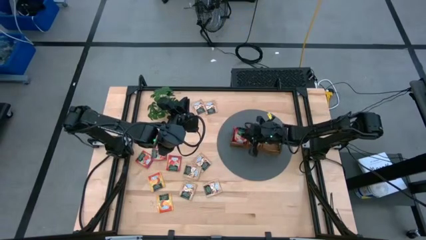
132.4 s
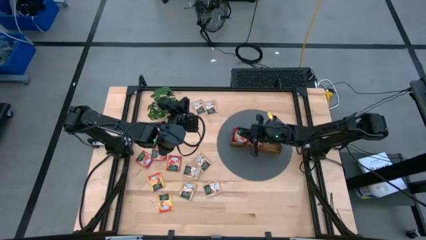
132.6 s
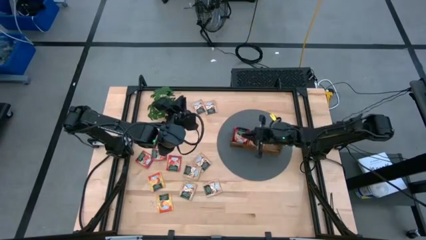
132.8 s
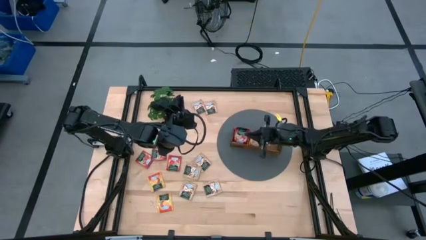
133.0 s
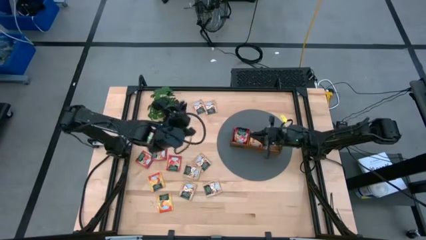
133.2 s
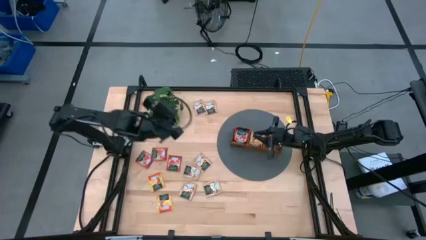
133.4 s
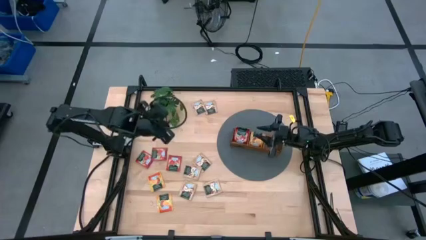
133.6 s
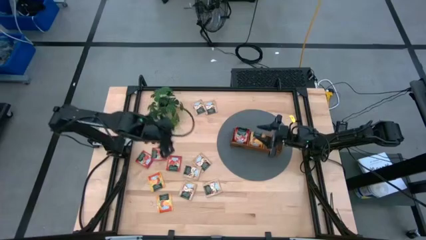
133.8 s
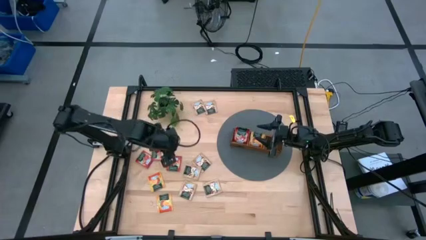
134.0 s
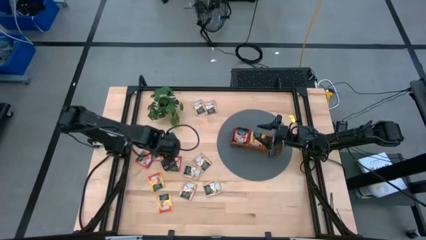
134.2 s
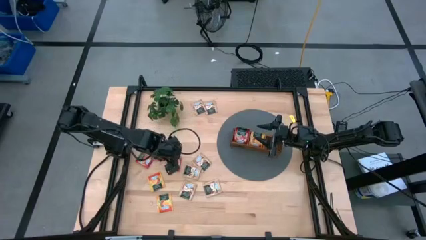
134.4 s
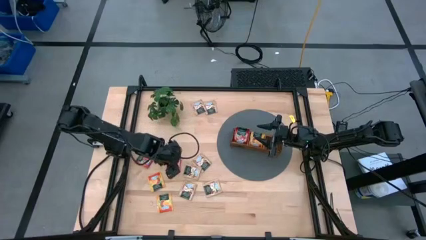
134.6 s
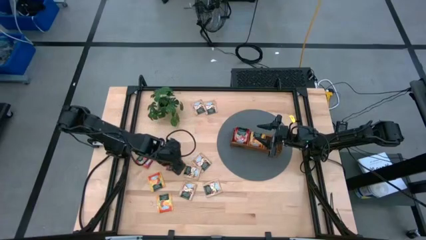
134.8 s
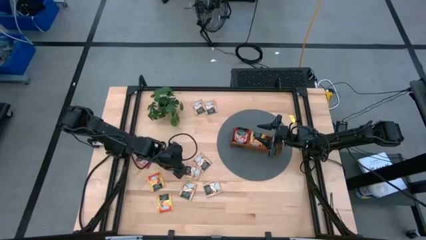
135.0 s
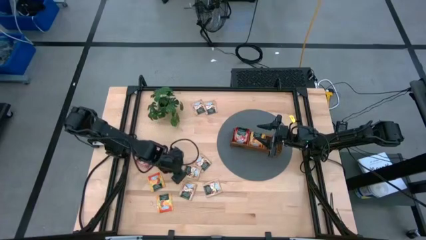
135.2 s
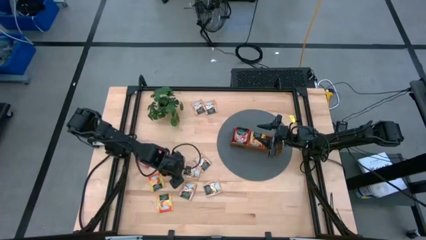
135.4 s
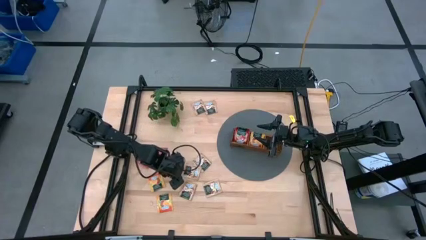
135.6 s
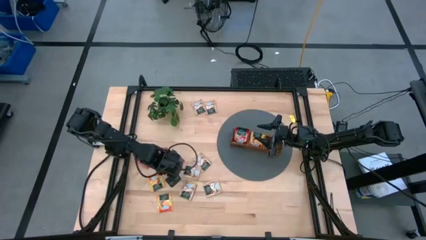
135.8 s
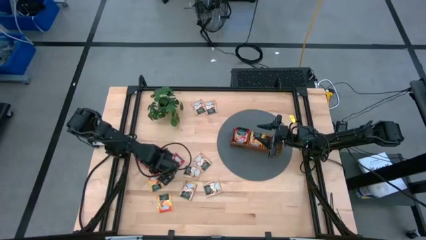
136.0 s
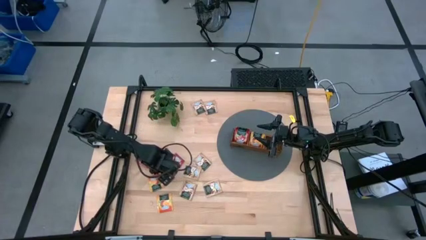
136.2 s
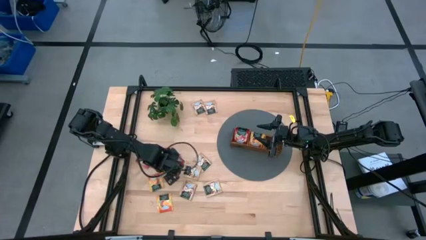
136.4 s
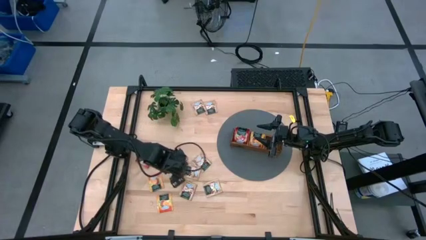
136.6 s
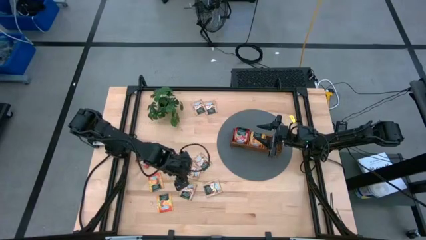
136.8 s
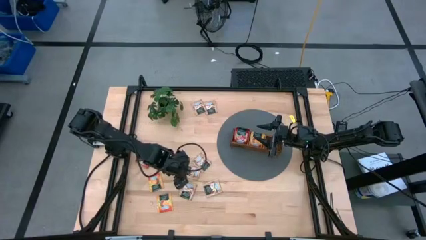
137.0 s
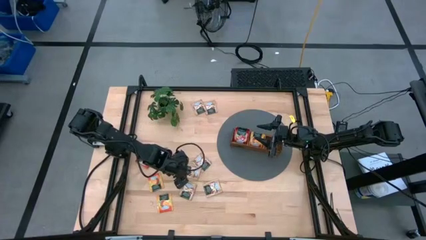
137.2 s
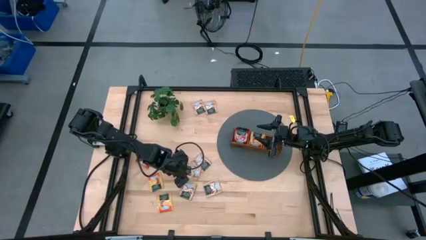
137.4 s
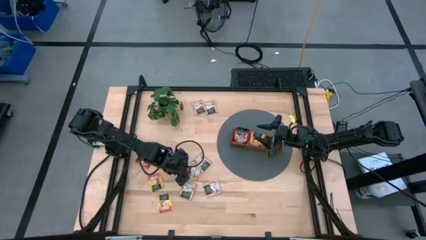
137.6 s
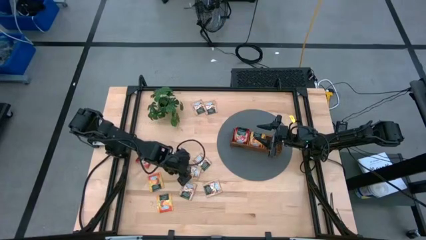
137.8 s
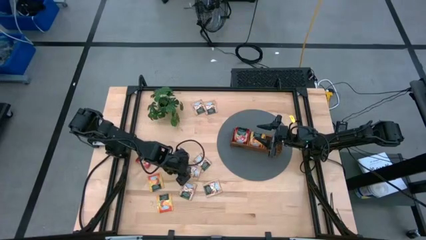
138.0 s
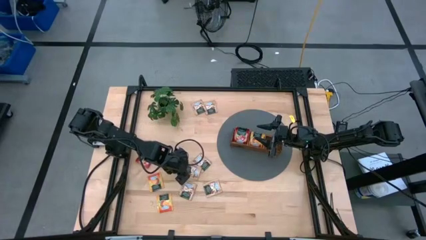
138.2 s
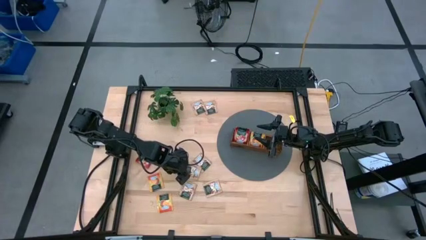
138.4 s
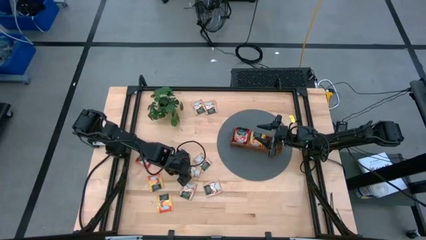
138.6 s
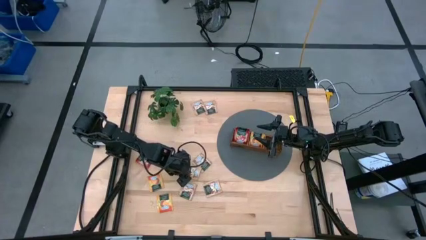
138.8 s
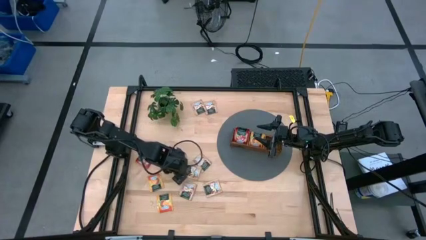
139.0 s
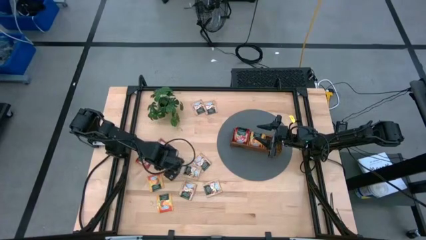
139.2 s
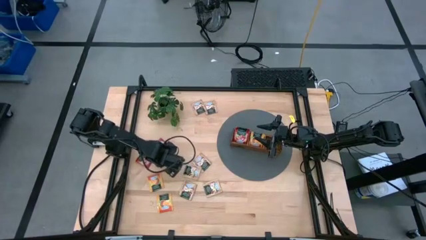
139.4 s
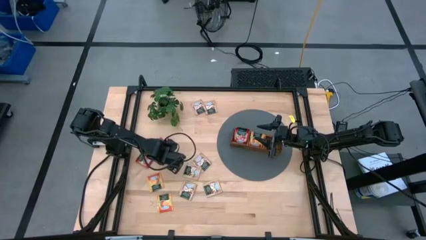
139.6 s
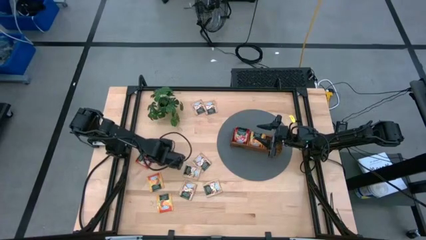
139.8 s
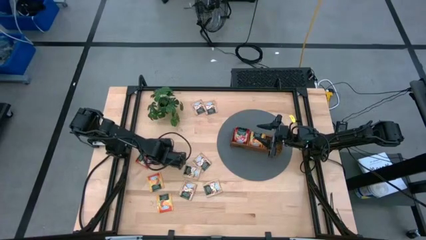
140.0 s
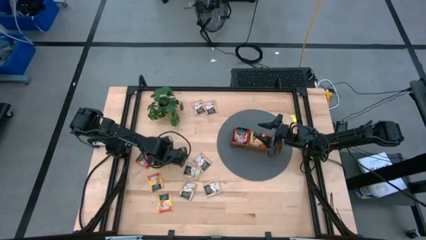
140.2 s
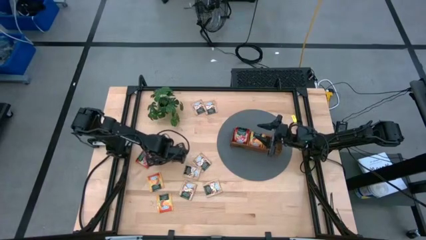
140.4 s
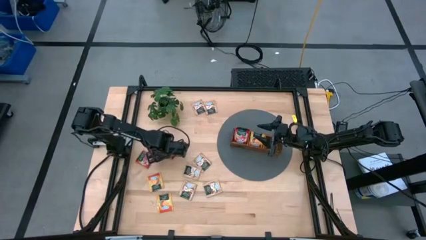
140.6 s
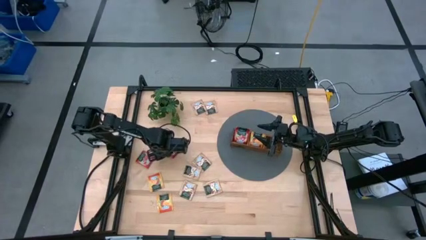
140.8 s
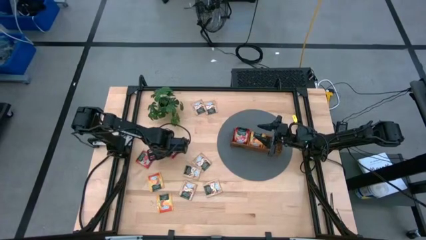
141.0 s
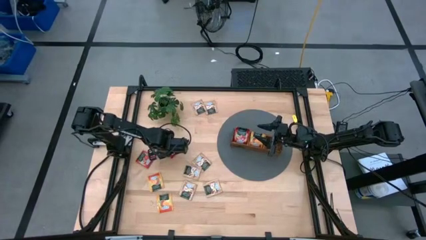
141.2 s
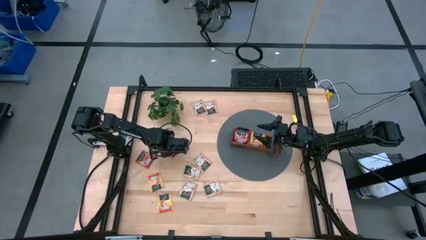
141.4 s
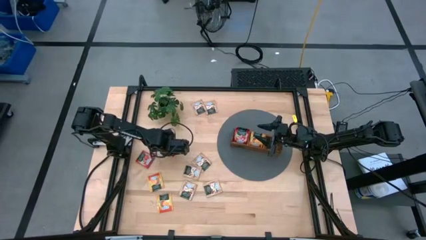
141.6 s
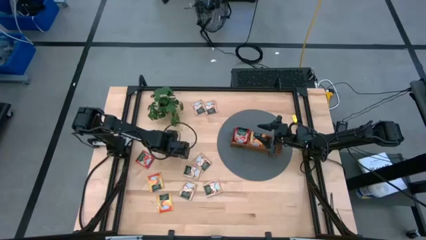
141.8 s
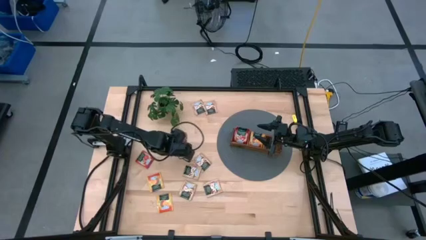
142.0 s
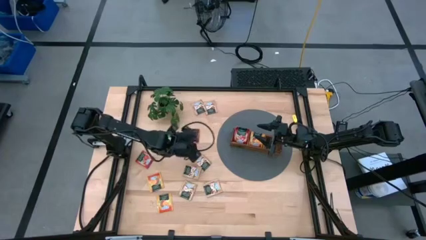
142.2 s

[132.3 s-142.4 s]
Task: Pick & Place Tea
Put the red tea bag into the left section of the wooden organizer

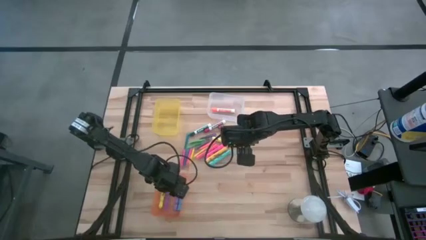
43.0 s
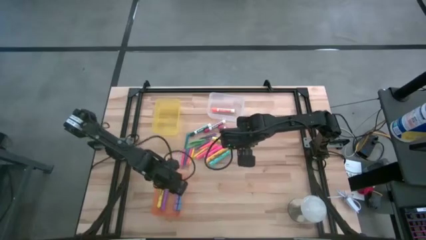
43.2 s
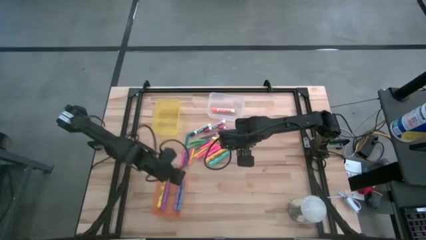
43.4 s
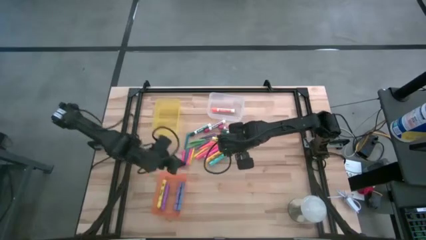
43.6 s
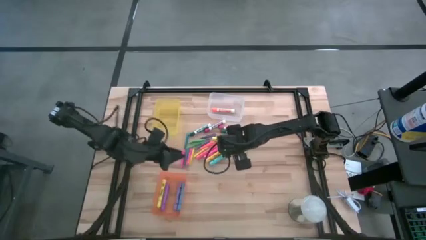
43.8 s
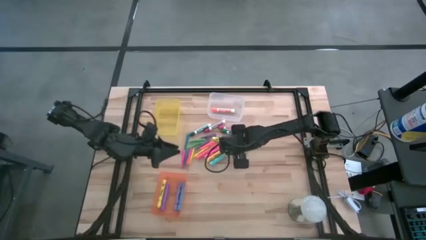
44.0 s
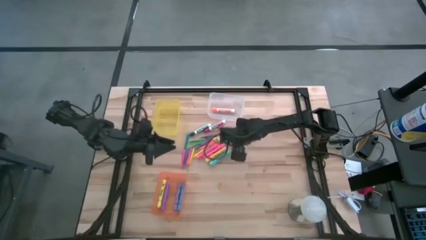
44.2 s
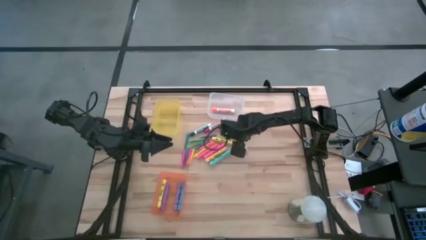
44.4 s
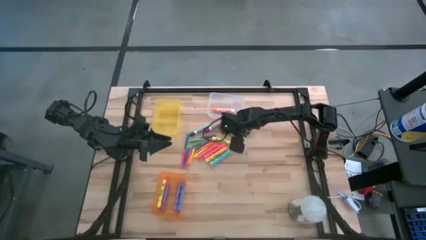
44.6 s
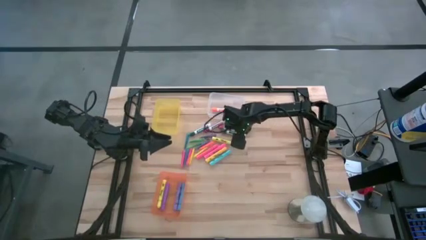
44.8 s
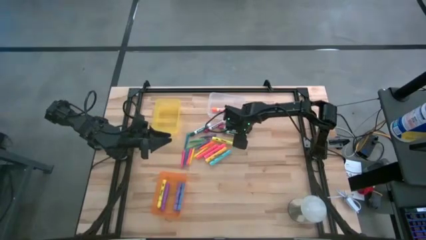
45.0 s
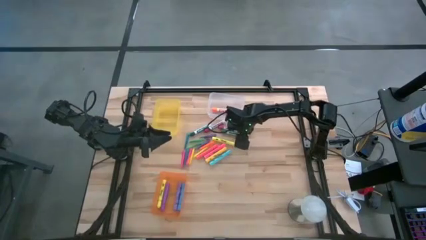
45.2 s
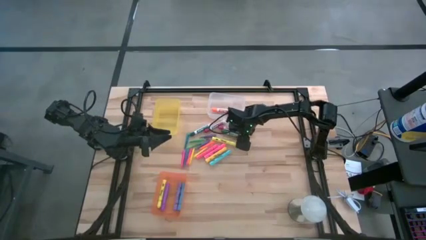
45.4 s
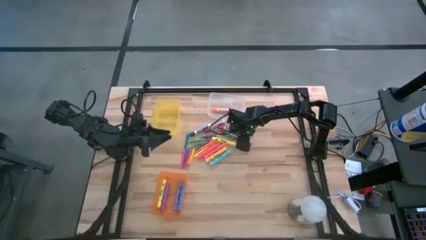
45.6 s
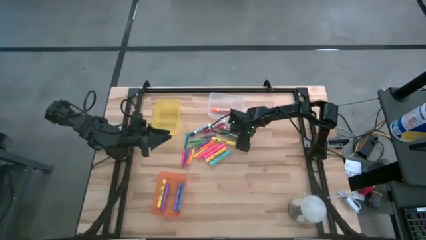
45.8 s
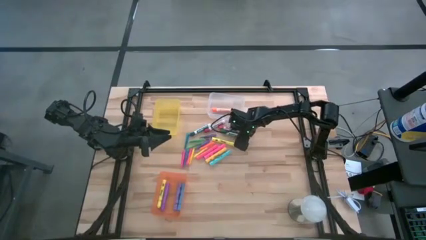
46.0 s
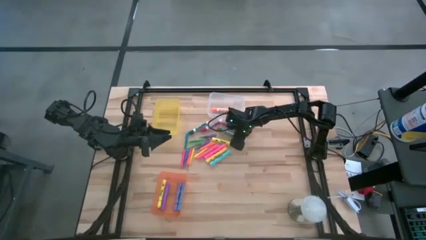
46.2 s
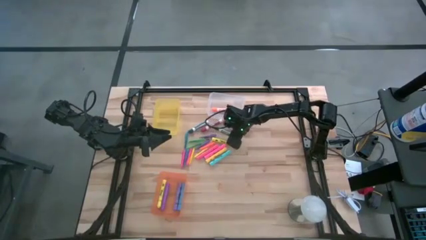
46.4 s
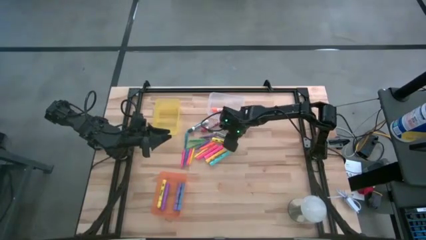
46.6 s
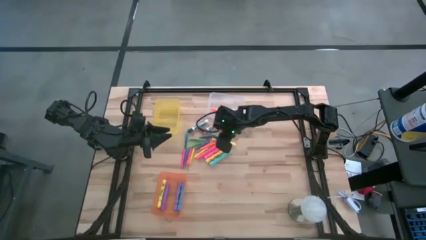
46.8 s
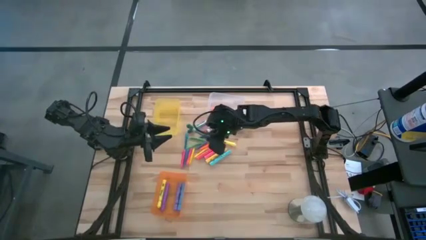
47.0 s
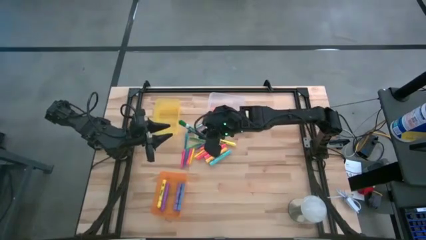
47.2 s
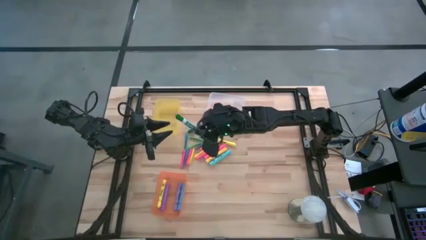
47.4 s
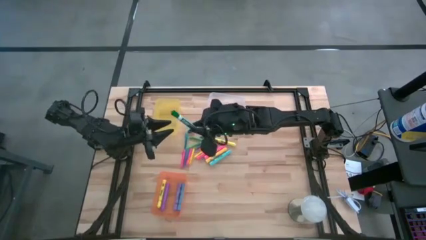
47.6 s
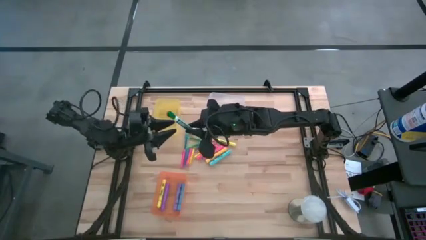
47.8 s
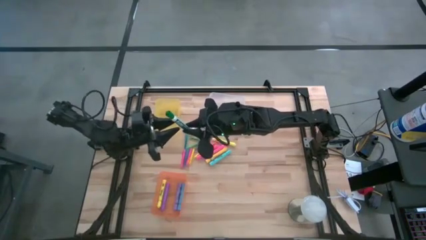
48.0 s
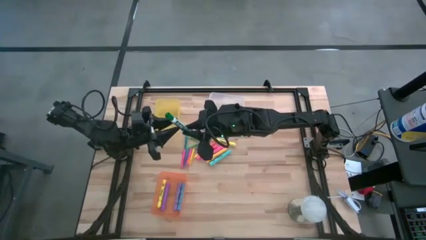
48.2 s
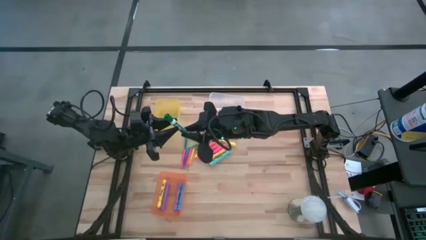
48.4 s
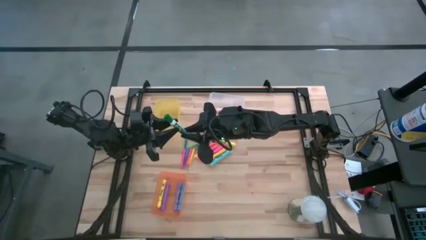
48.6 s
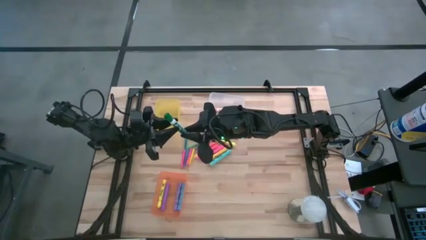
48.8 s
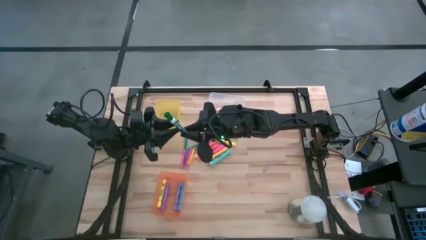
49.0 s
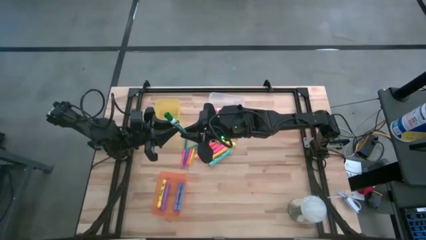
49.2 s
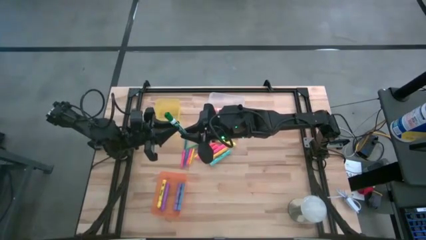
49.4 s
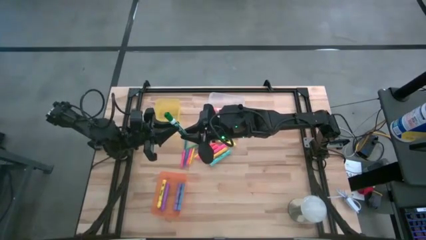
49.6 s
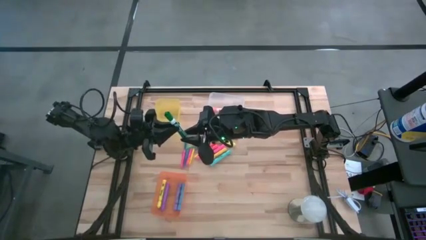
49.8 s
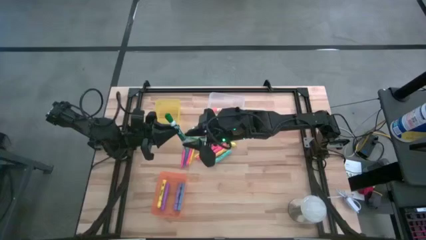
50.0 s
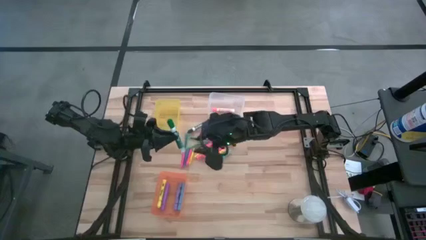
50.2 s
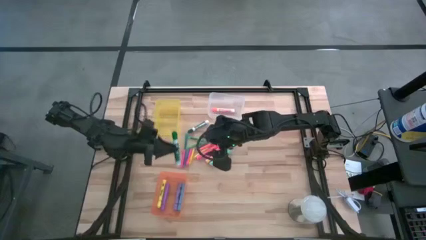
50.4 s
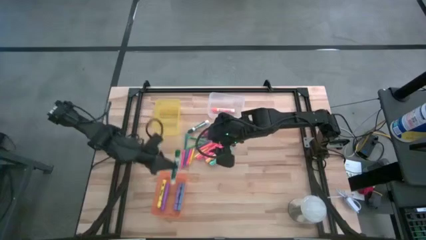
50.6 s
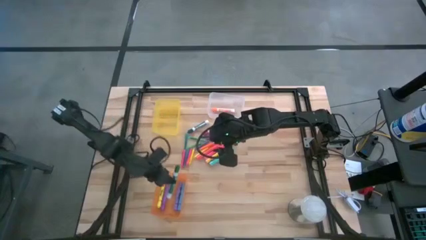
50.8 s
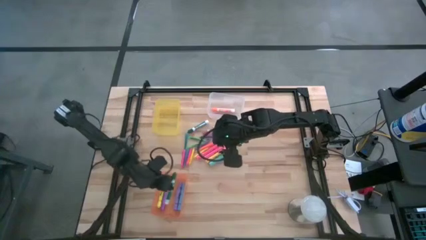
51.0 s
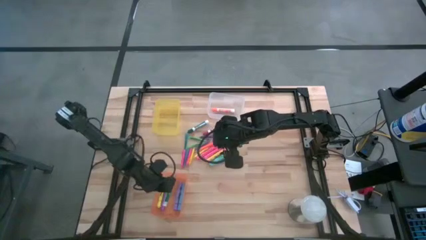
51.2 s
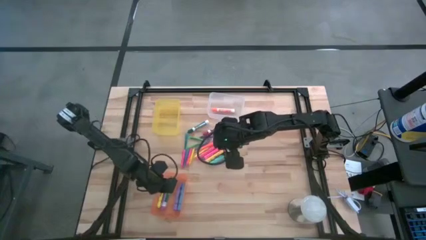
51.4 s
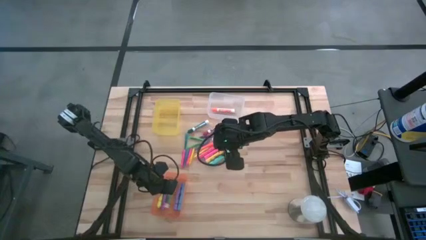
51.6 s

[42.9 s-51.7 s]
Task: Pick & Place Markers
Put the green marker into the transparent bin
